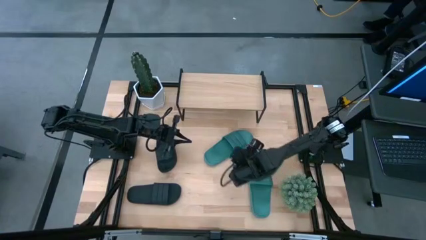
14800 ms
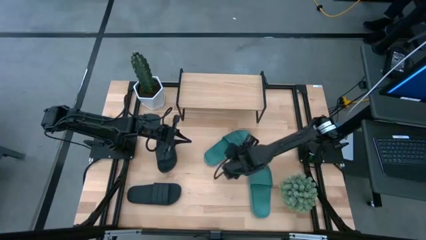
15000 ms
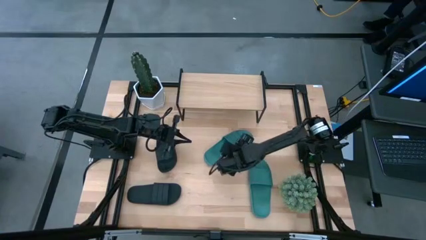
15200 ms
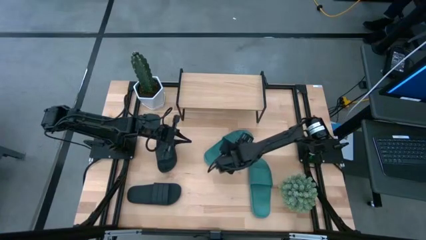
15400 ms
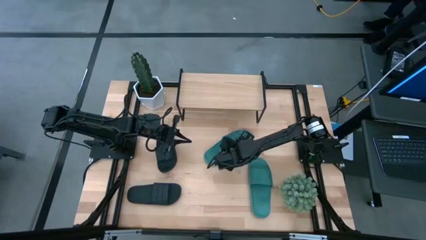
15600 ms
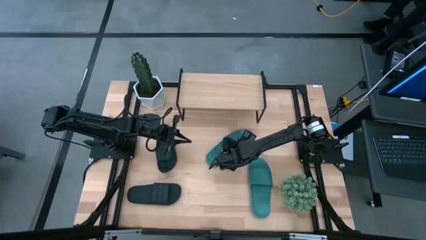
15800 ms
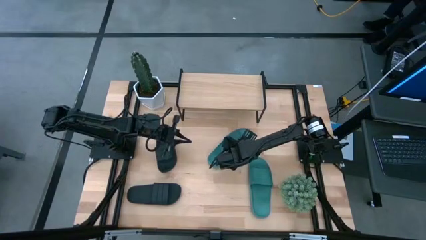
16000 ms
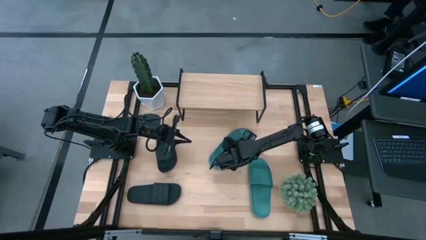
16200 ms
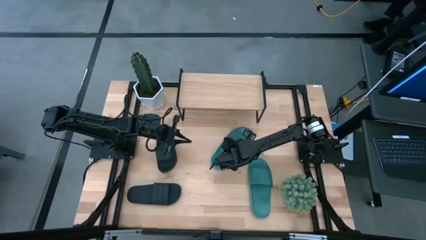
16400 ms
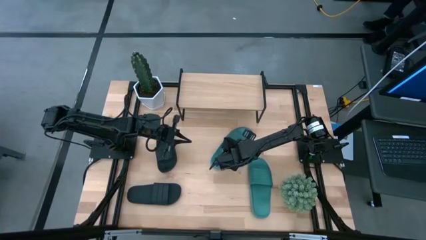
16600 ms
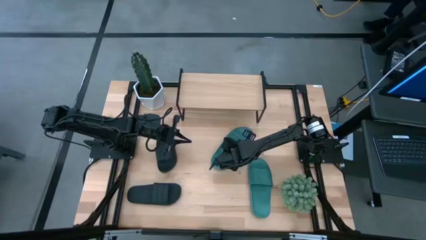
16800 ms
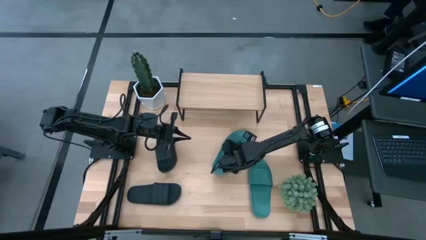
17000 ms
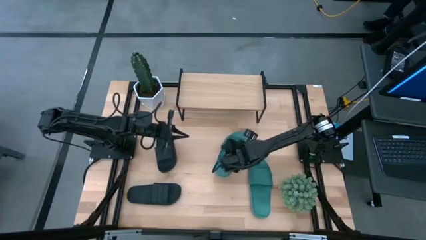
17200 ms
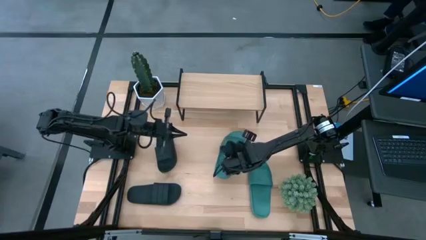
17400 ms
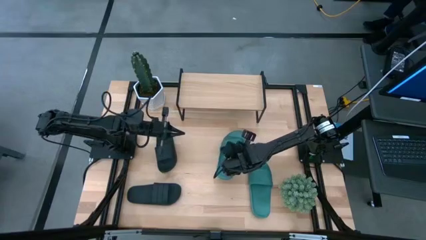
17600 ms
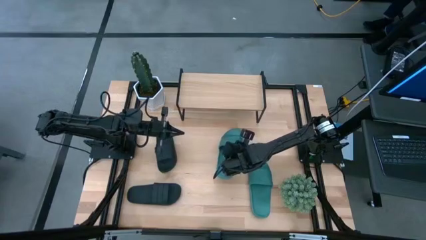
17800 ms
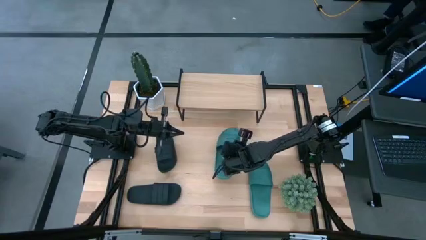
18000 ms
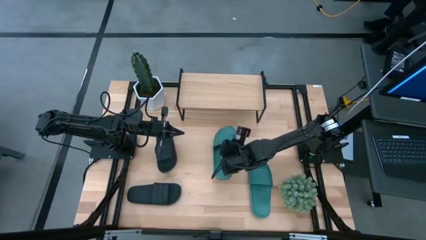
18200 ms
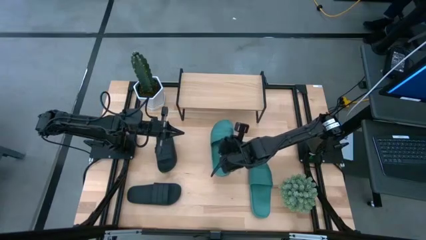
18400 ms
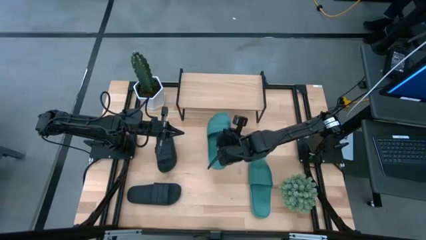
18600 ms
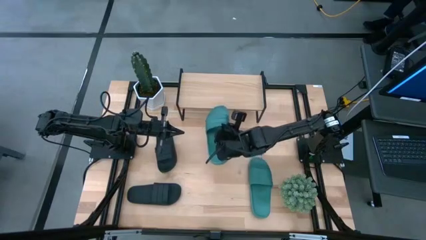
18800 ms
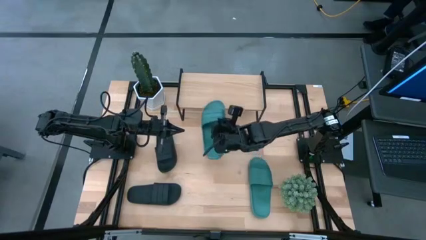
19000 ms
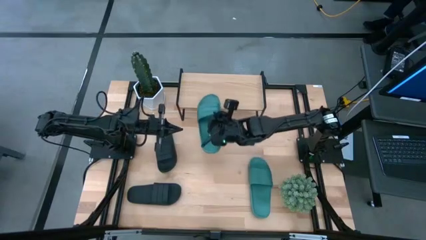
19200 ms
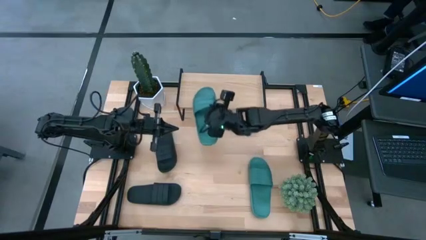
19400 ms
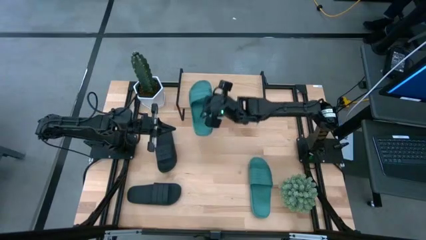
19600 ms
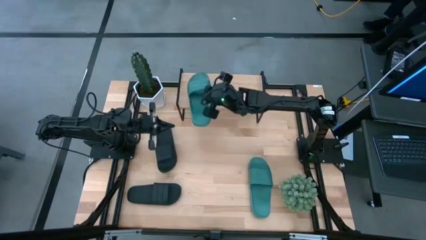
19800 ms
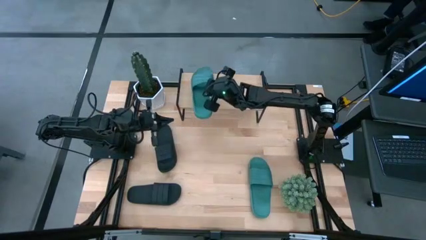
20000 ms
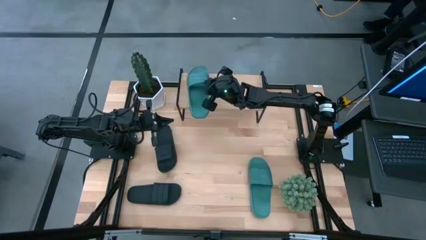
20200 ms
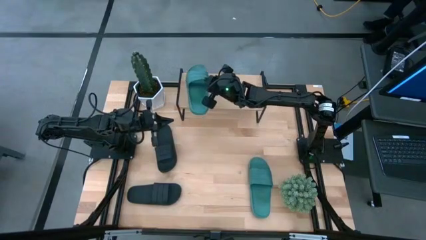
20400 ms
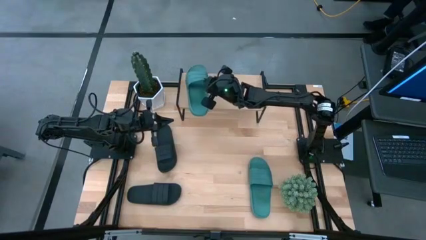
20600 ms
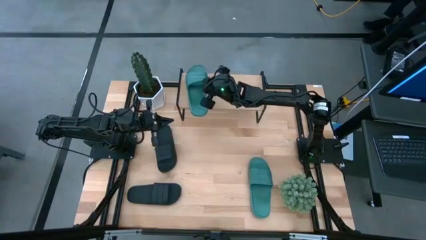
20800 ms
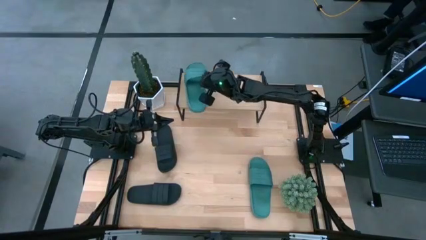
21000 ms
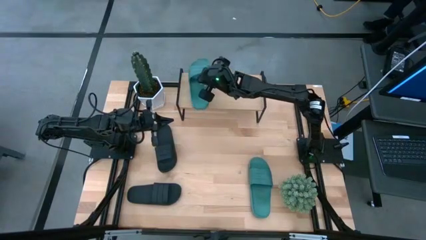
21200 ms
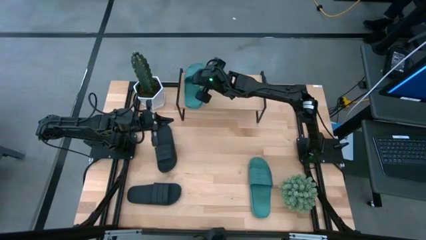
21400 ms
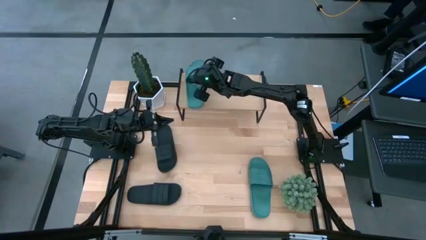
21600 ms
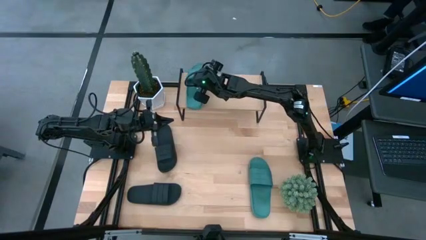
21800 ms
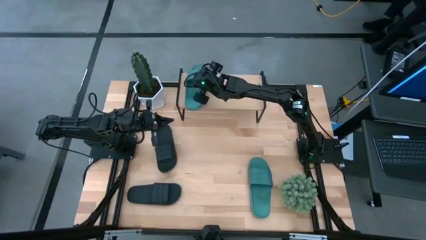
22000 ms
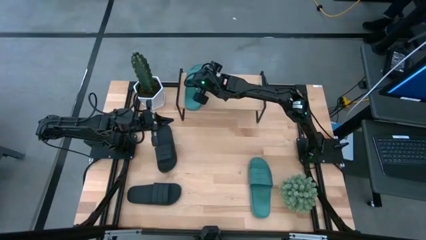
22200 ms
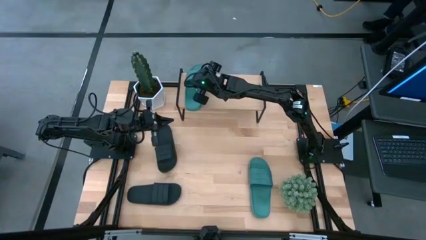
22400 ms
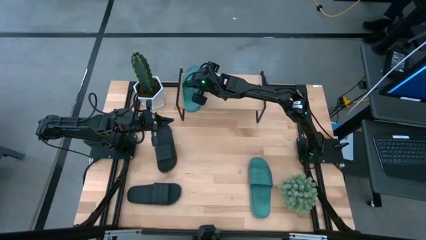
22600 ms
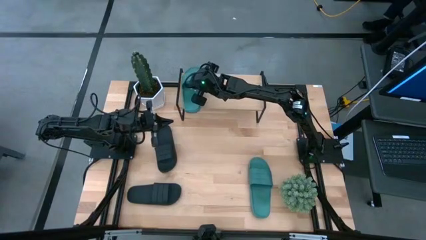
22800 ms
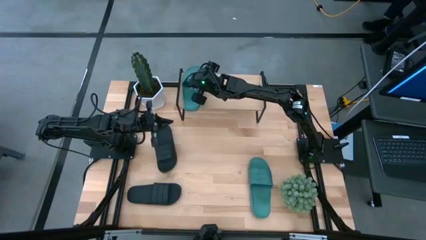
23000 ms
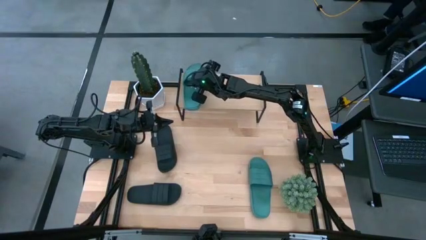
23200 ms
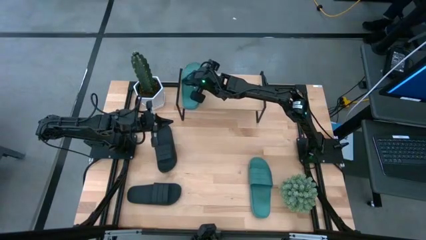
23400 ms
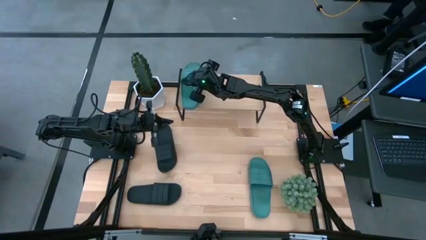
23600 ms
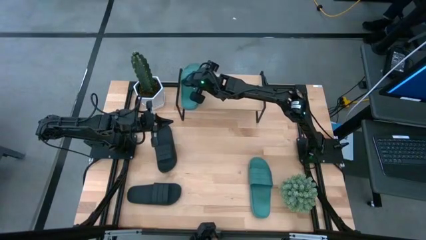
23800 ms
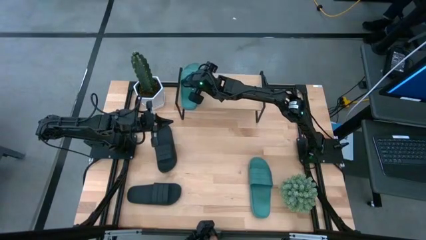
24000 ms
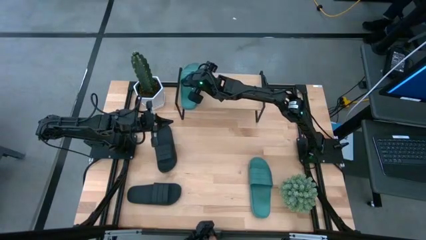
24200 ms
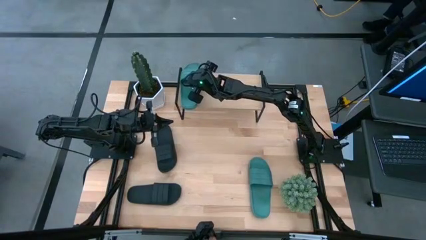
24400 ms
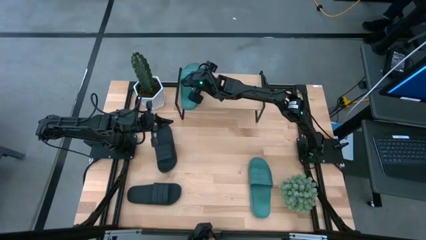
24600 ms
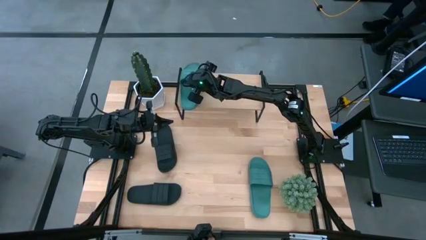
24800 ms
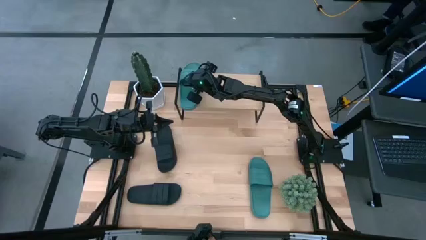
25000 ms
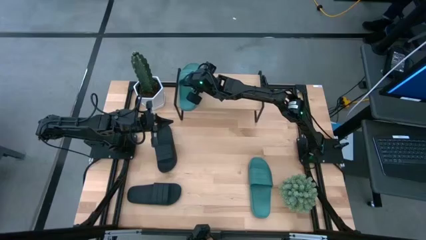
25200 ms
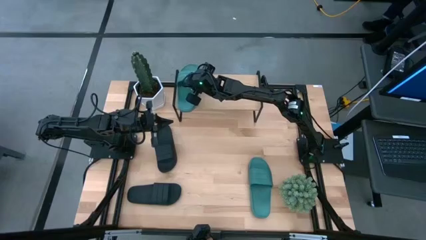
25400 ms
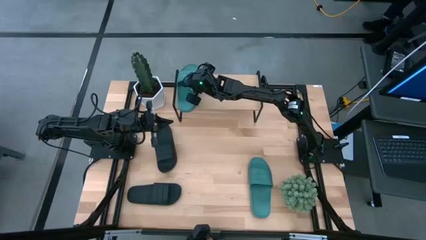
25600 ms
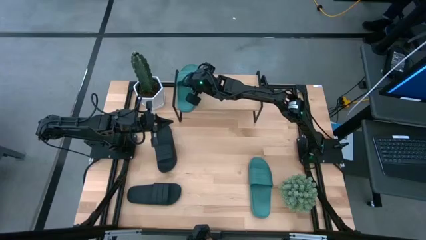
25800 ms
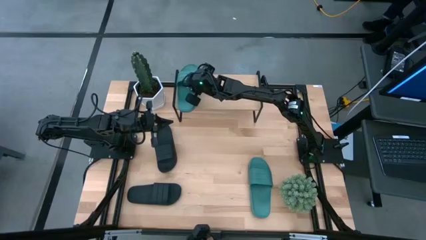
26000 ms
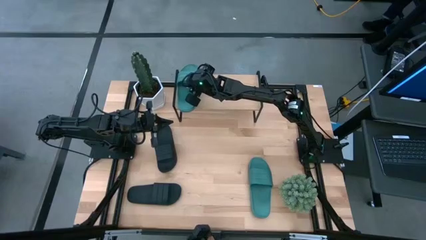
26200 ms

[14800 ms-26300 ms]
Task: Pick and place slides into the shelf
Put the green slipper on the shelf

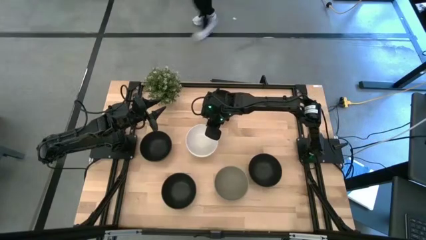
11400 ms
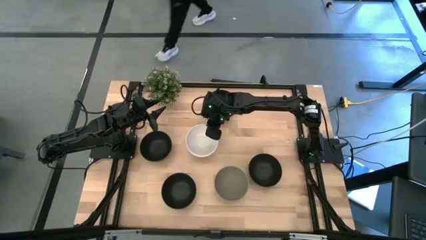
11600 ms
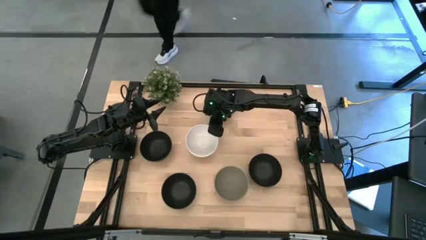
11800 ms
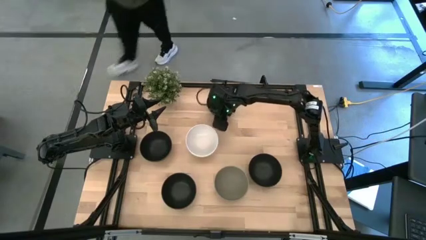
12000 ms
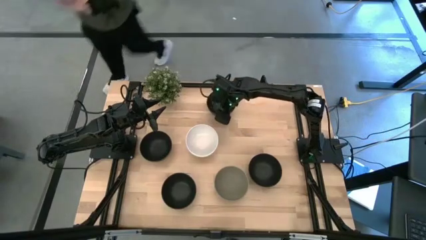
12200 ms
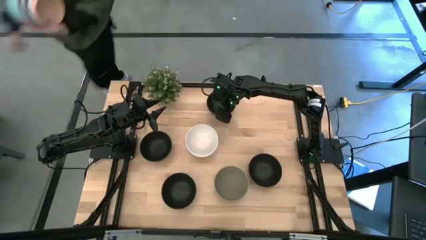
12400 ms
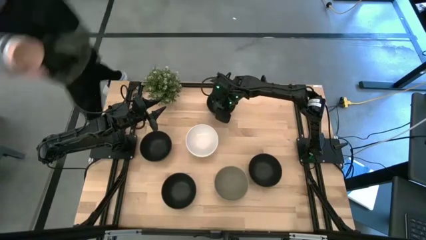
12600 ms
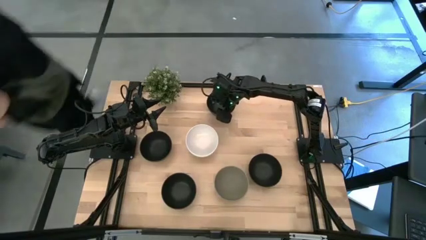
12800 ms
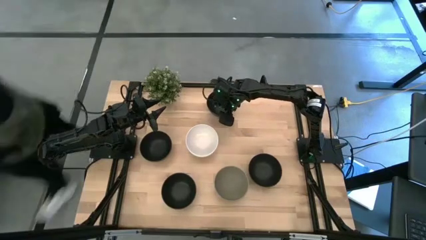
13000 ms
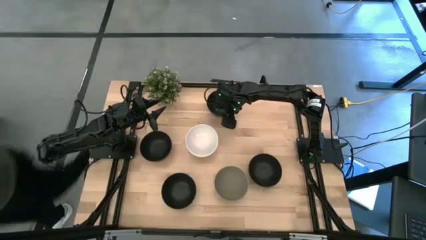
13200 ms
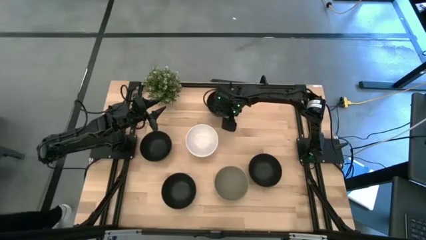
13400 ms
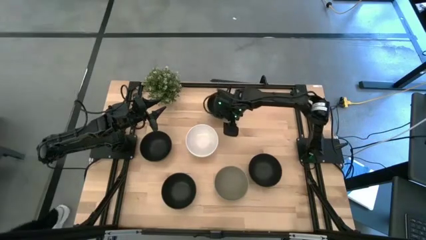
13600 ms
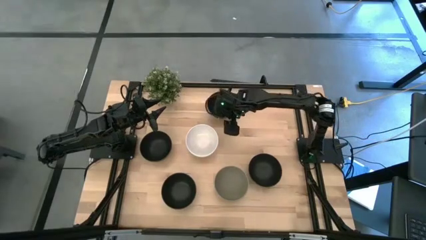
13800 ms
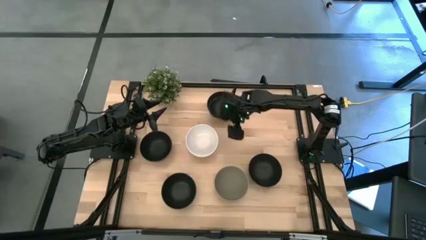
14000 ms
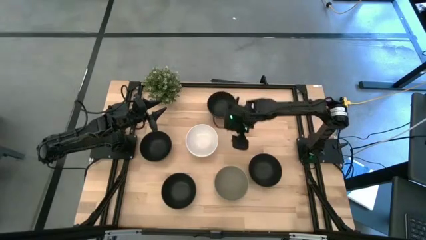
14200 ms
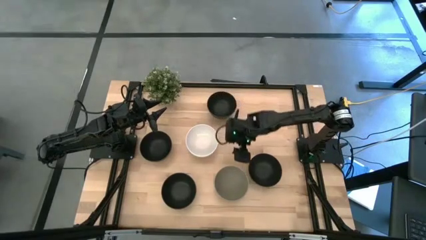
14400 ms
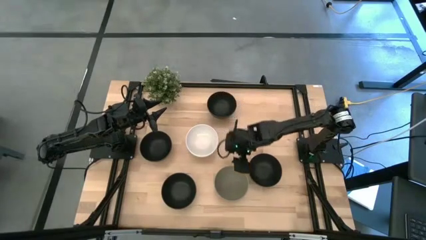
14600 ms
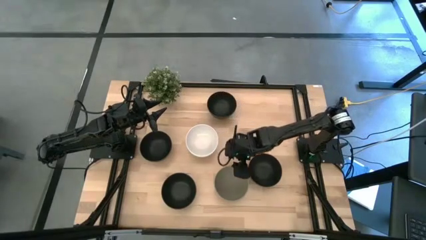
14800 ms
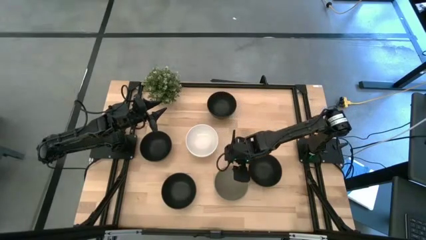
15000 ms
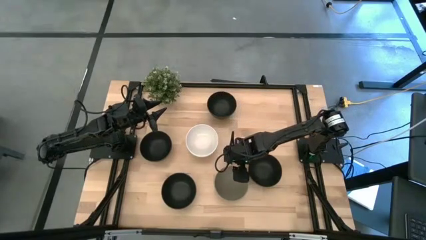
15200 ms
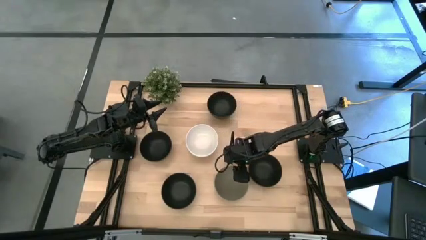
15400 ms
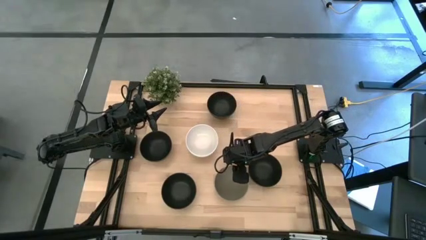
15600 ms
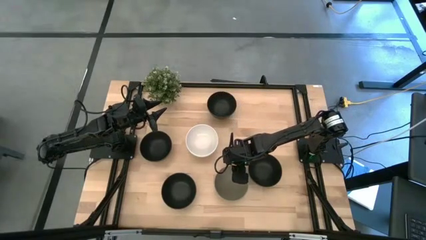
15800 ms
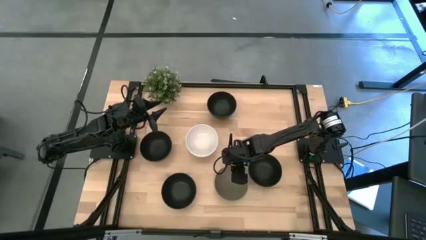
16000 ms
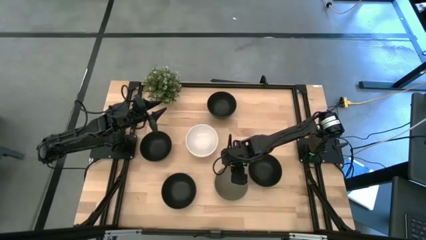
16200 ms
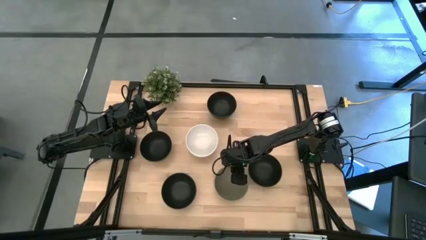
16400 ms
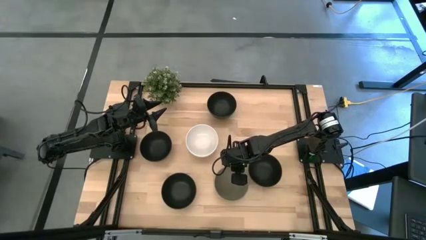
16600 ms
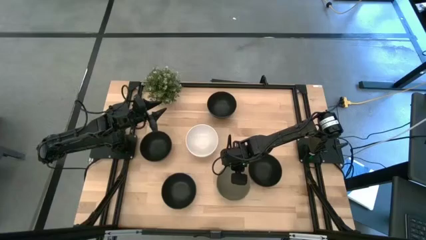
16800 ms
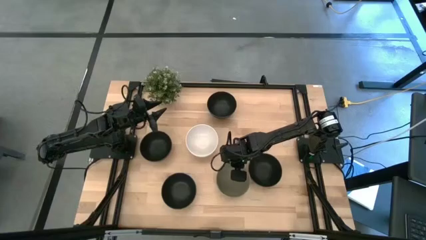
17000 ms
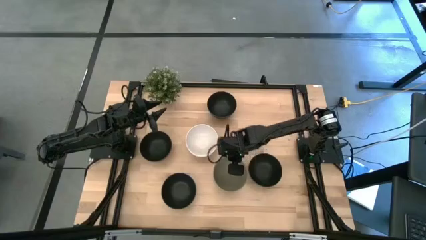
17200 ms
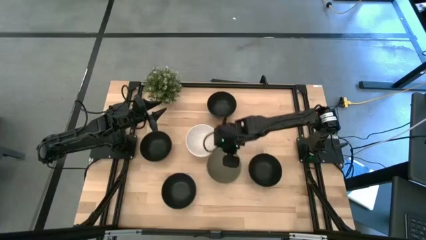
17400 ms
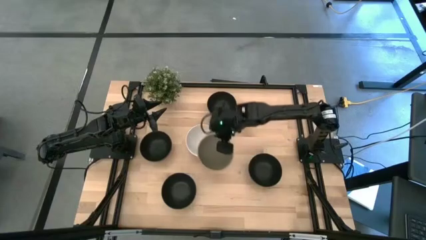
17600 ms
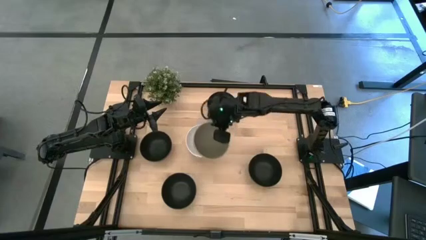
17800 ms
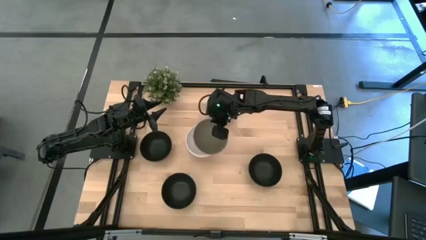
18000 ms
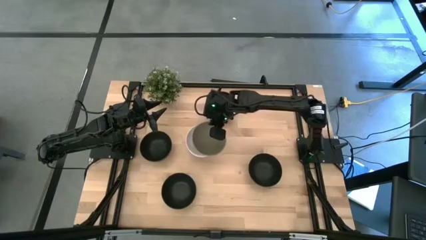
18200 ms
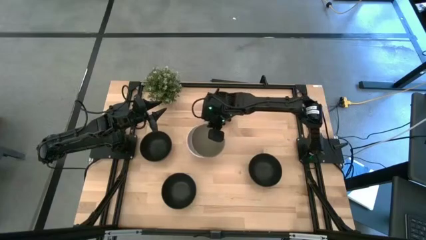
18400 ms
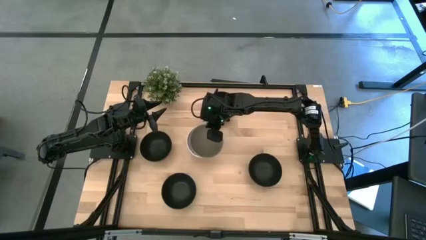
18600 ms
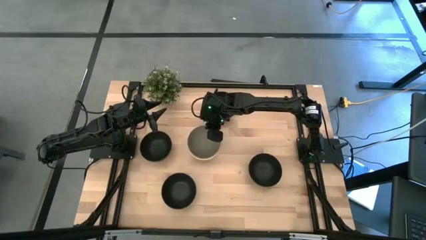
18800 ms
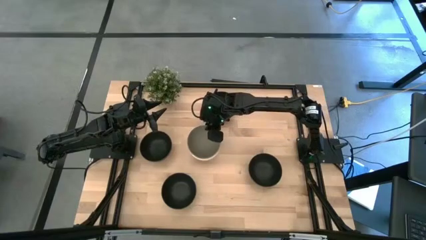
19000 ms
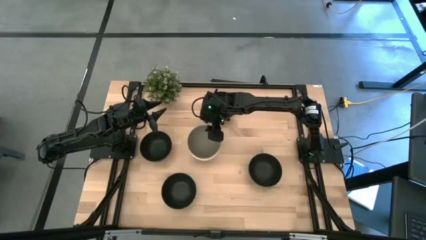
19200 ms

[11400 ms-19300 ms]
Task: Nest bowls inside each other
Stack the gray bowl on the white bowl
